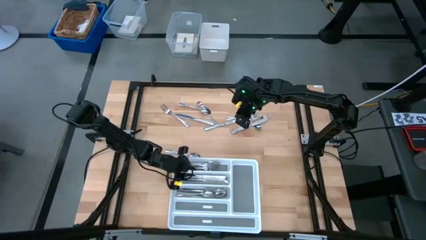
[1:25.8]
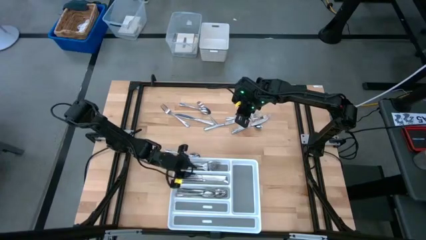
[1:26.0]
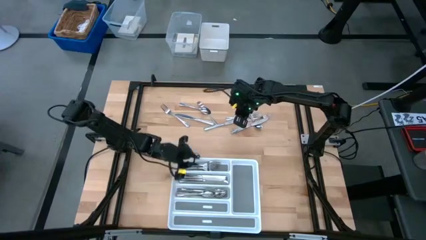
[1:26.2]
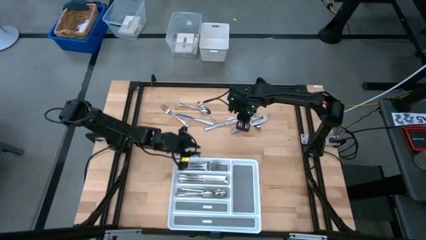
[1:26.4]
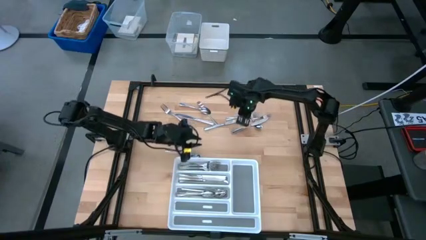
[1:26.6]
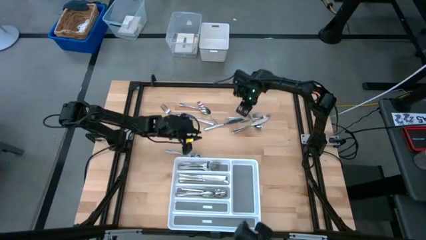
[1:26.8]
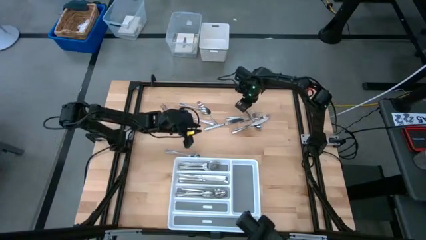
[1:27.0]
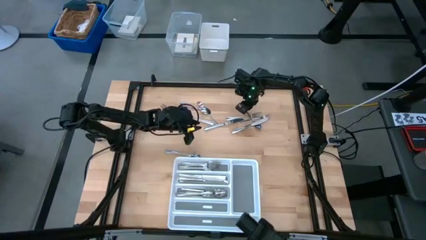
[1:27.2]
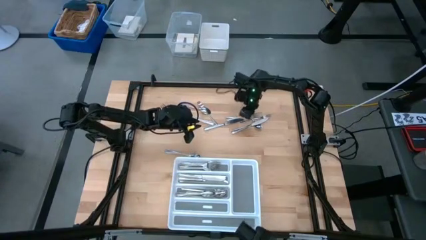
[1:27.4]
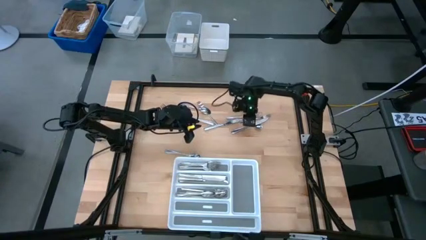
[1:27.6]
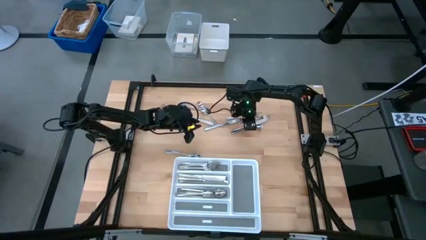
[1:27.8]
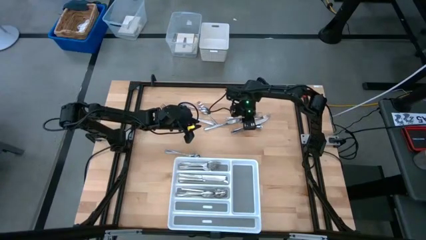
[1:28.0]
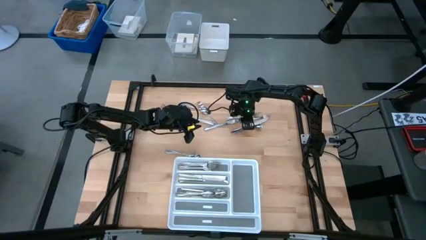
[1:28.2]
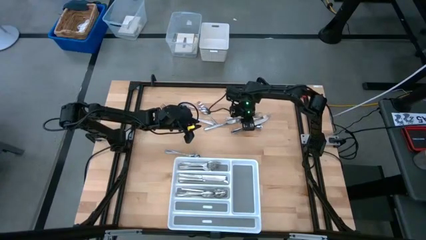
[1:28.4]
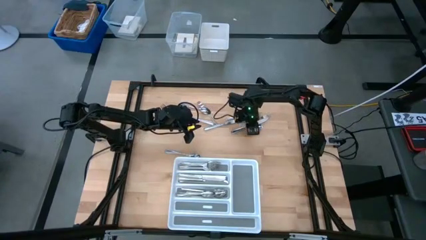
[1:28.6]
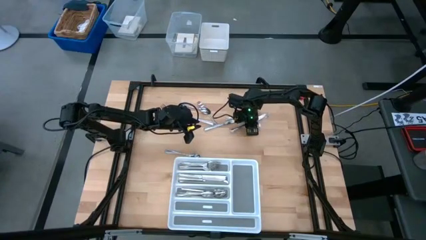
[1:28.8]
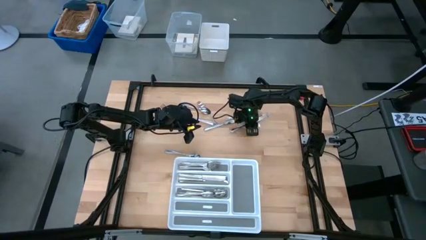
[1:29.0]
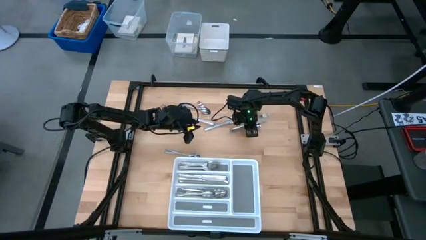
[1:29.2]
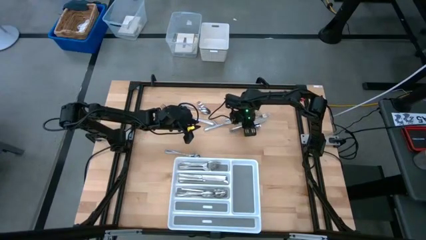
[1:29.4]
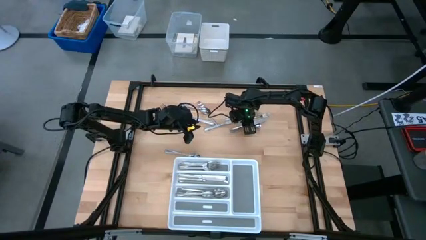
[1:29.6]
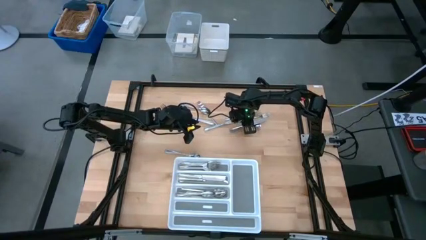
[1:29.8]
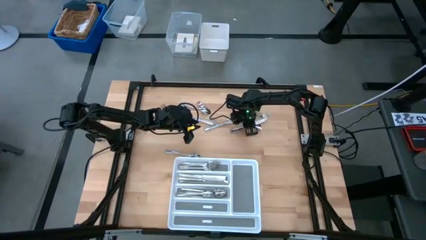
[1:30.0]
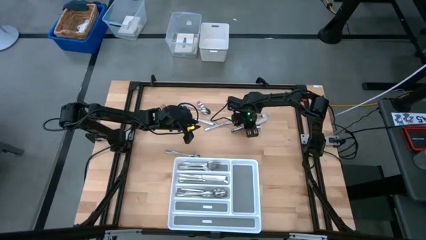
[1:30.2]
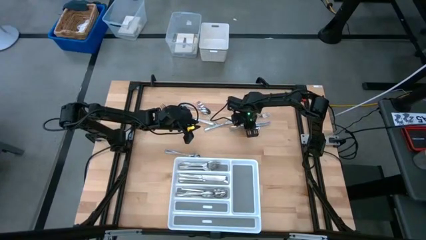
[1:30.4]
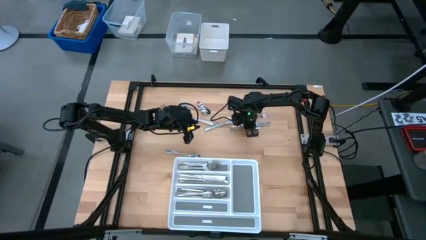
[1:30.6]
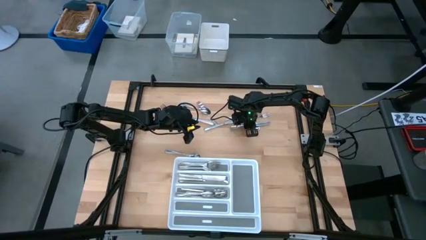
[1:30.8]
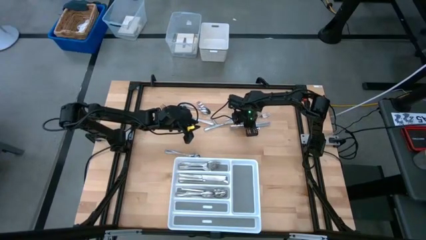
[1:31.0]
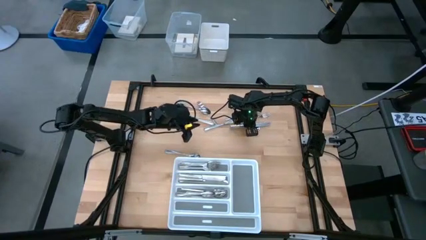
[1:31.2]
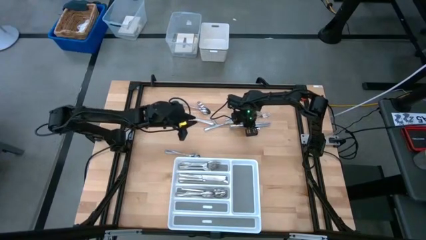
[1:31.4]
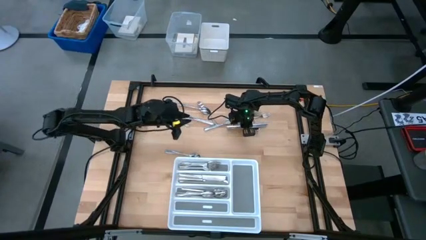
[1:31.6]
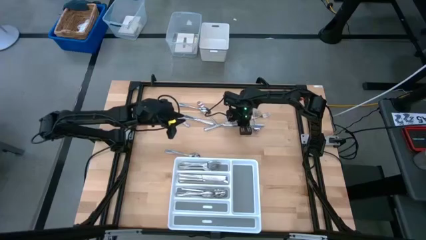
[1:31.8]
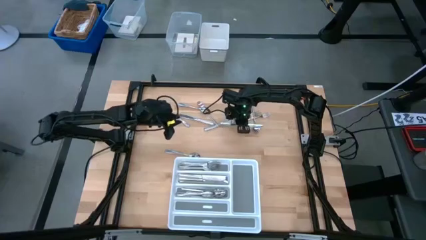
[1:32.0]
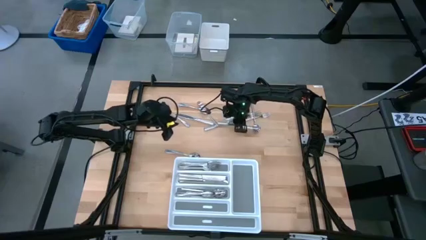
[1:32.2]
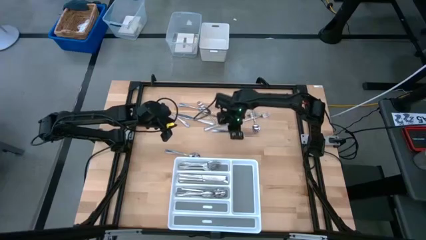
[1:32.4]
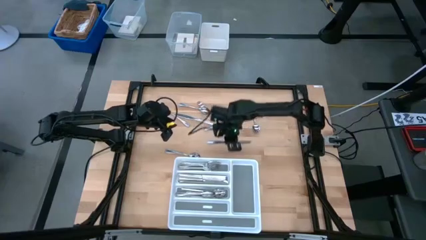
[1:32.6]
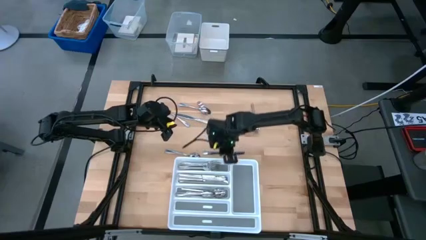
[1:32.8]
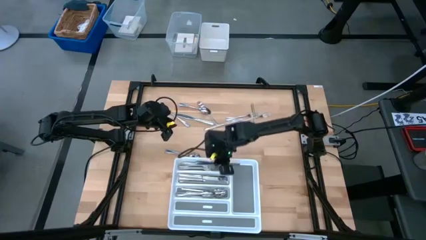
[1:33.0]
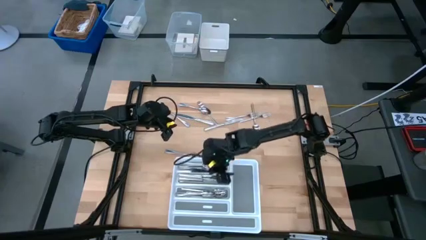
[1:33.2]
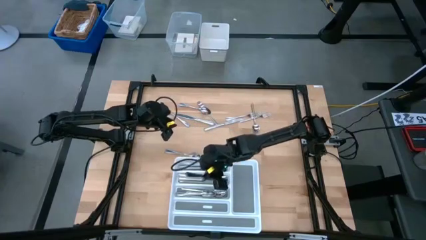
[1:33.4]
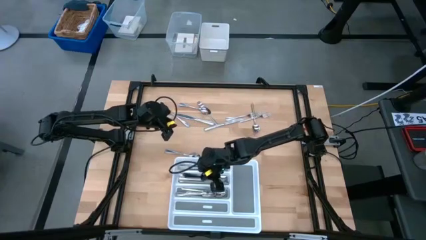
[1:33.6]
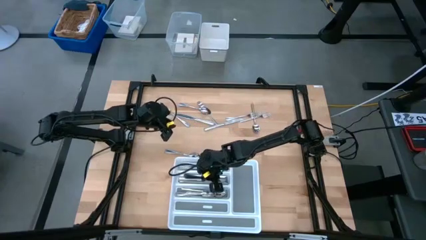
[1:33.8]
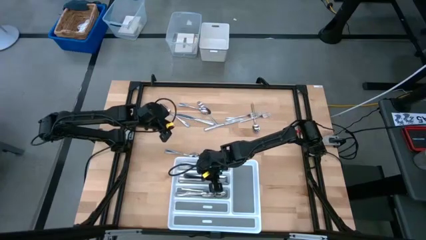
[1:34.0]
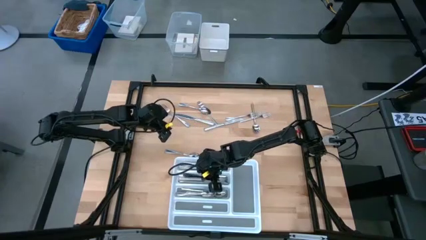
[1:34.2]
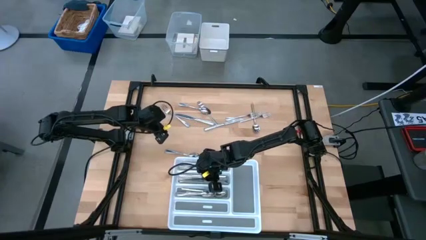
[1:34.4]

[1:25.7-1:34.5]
Task: Sort silverware
Put the silver knife into the middle section of the white silverware tray

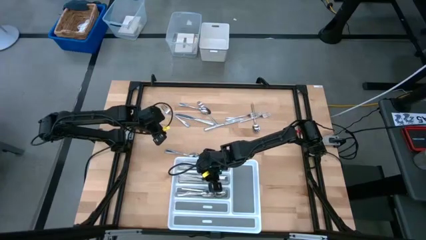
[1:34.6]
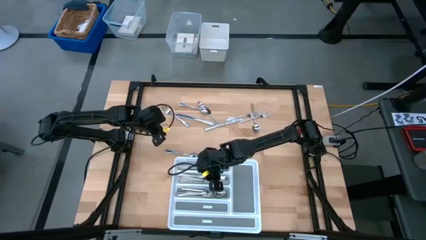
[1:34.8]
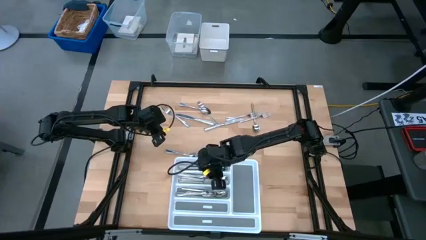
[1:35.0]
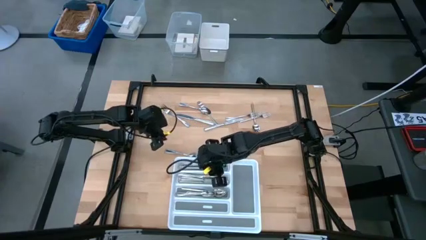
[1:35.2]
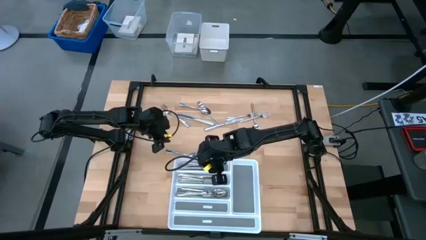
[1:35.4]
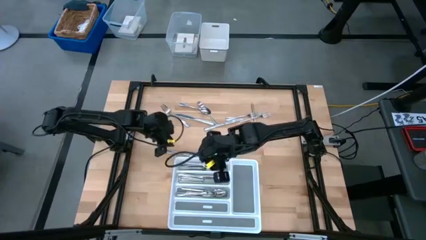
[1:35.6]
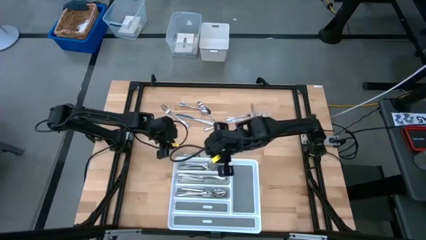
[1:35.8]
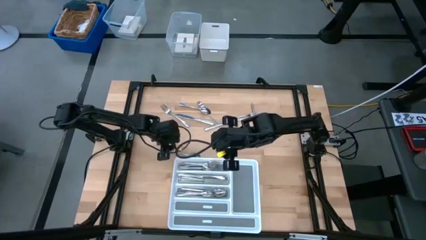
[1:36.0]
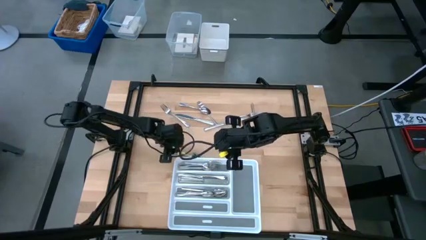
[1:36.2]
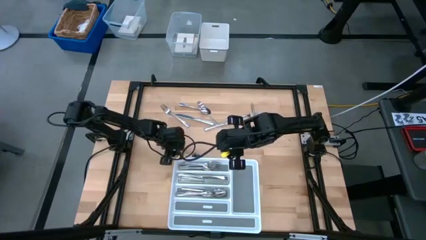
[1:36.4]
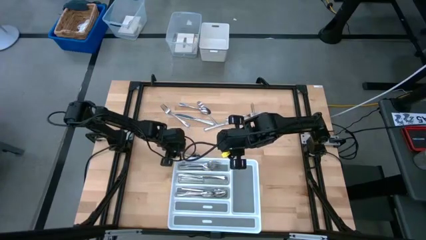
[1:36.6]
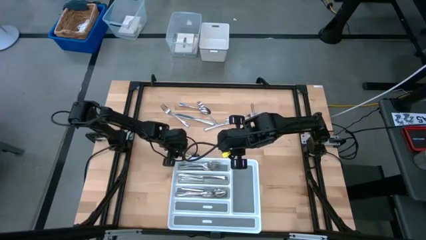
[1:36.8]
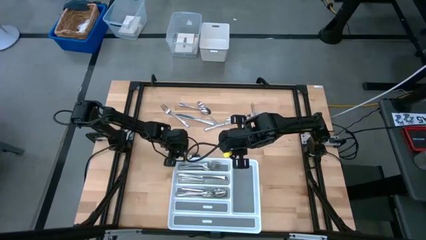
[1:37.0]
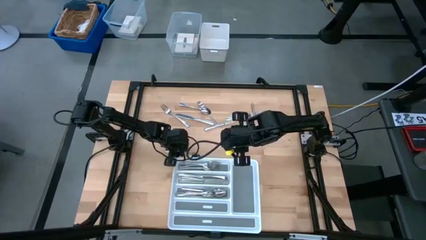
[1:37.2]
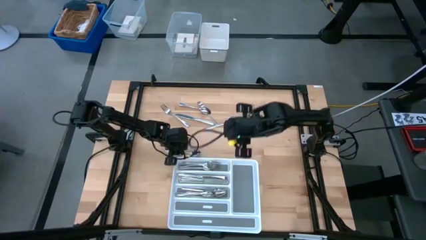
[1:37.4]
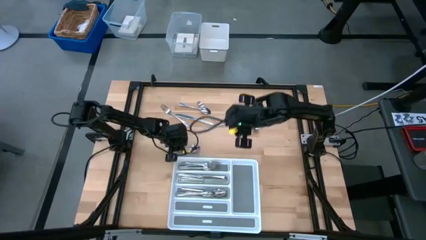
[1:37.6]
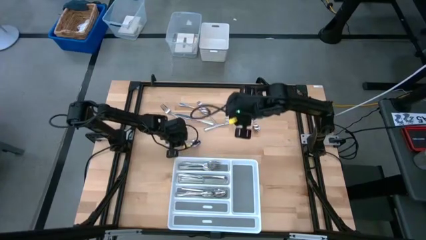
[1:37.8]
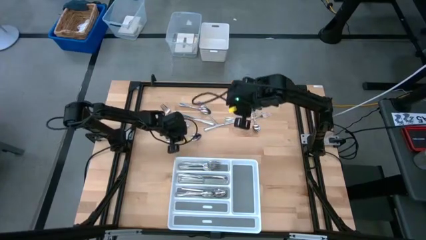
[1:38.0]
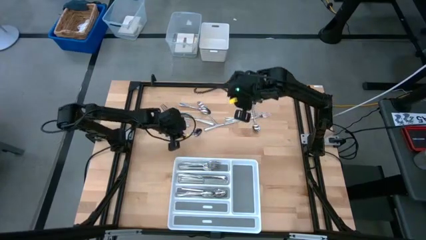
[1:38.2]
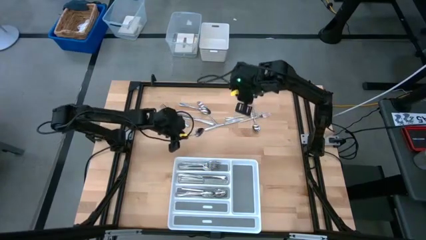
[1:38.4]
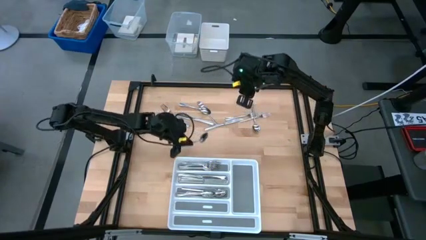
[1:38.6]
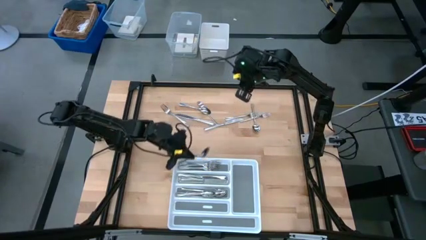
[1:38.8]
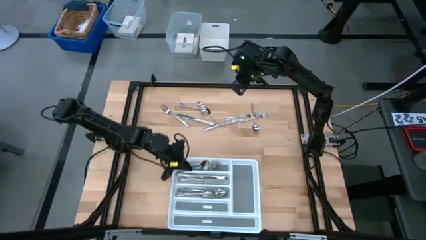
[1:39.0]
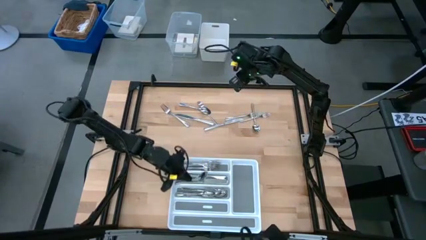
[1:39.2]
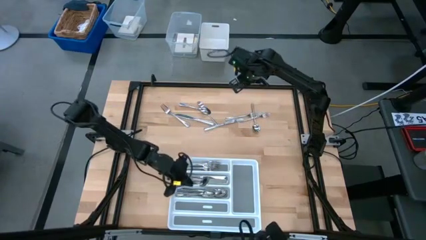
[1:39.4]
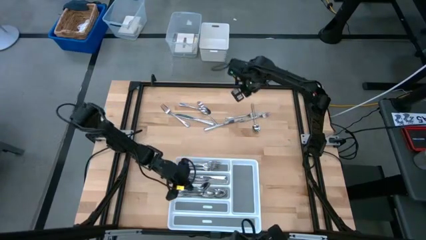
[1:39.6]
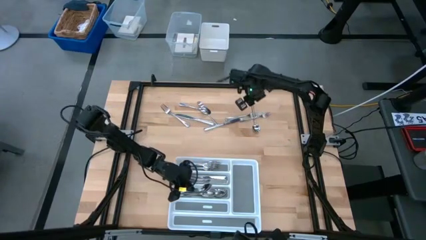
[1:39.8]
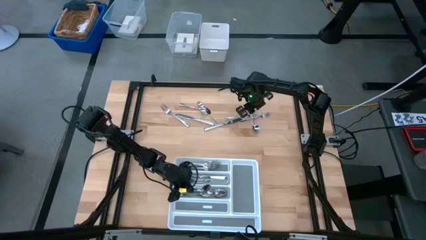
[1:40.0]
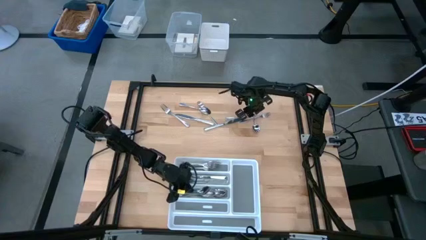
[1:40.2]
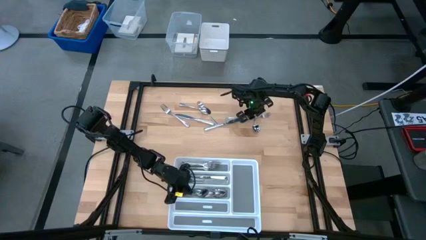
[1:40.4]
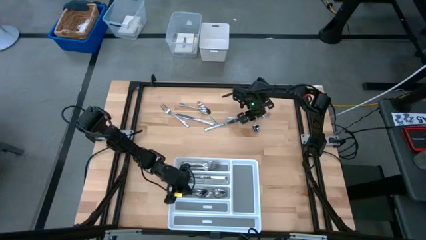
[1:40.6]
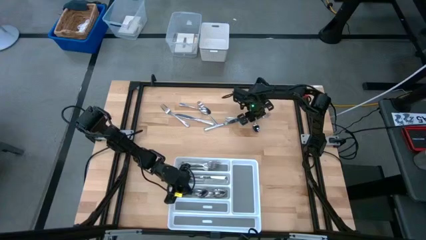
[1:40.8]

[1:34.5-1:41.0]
Put the silver spoon into the bottom section of the white silverware tray

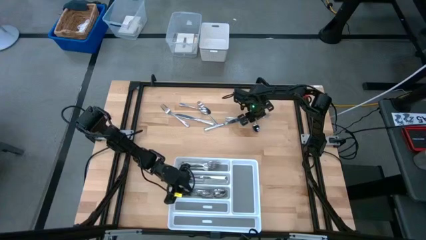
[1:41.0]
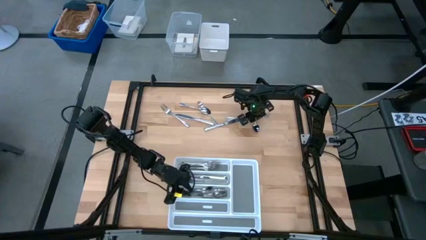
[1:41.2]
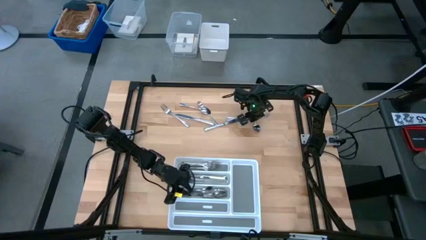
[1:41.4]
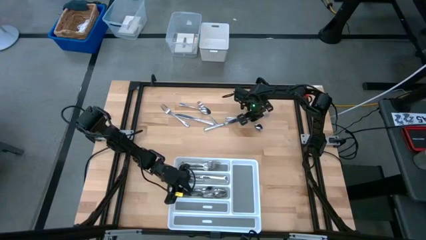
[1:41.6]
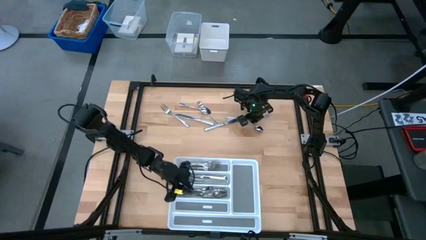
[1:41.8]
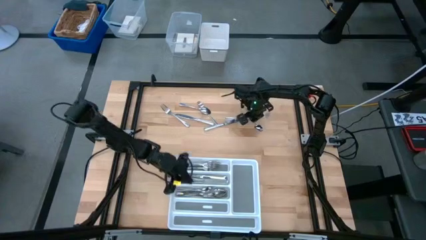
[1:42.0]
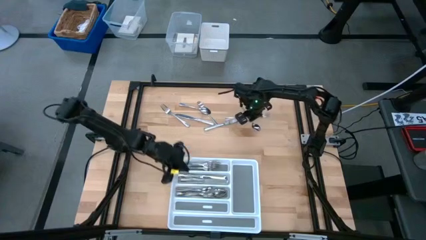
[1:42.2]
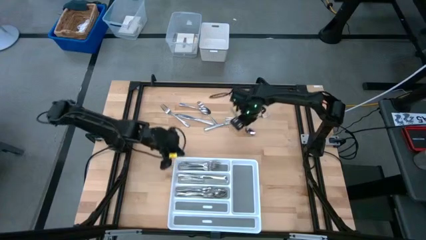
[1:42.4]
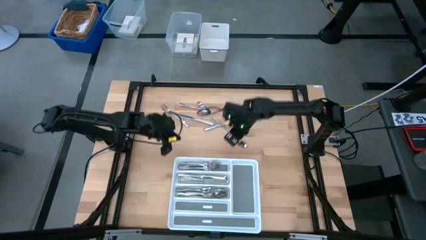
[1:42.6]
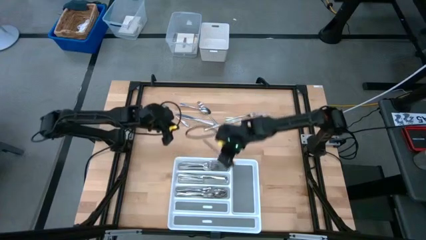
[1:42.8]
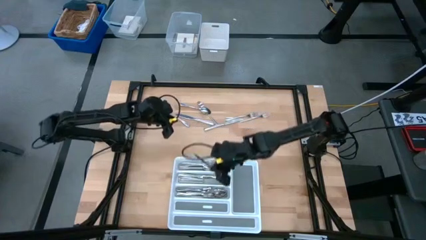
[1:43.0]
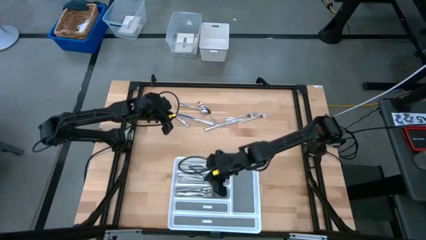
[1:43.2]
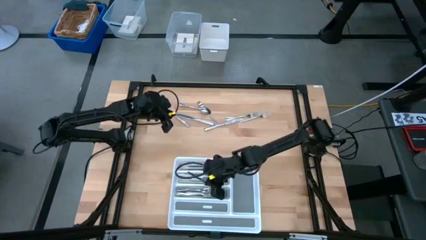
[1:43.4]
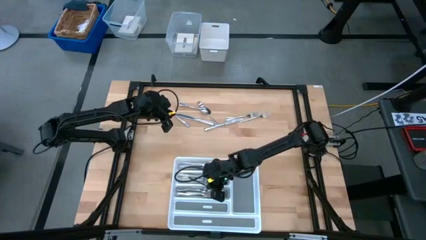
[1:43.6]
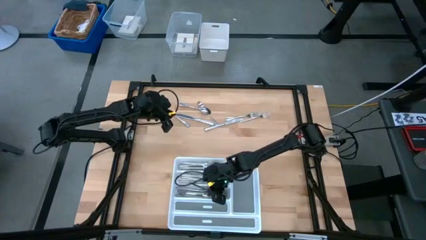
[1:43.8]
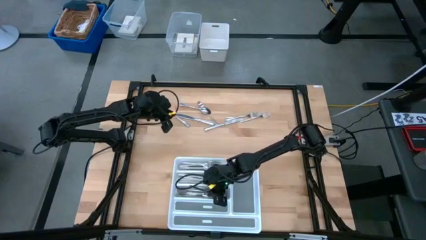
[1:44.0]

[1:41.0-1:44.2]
Put the silver spoon into the bottom section of the white silverware tray
